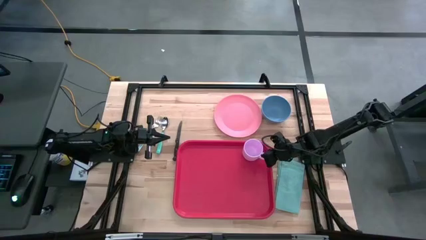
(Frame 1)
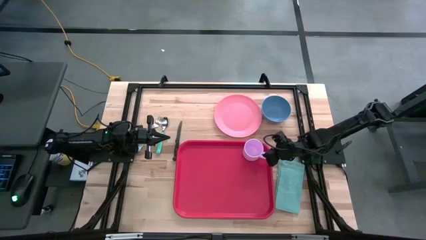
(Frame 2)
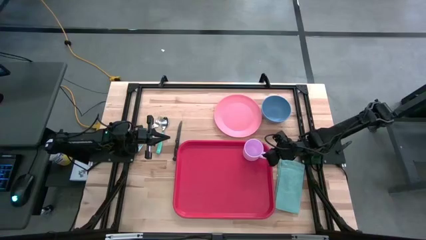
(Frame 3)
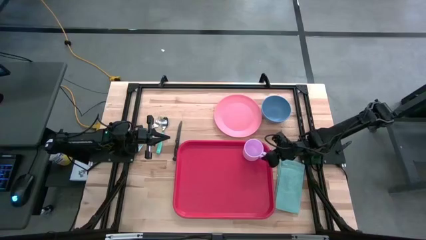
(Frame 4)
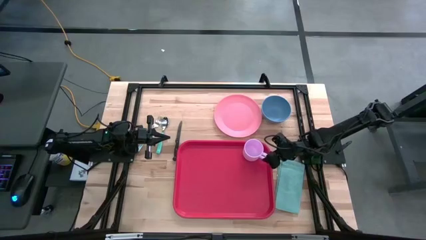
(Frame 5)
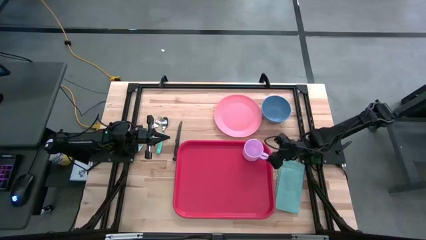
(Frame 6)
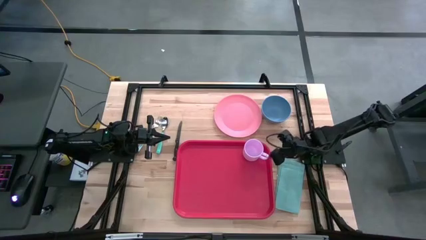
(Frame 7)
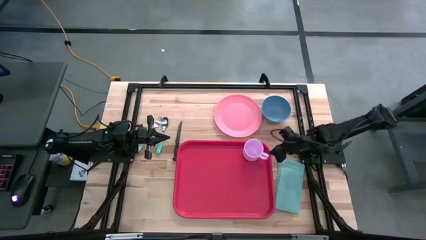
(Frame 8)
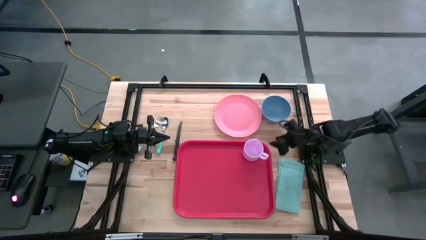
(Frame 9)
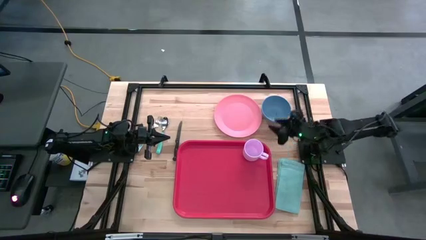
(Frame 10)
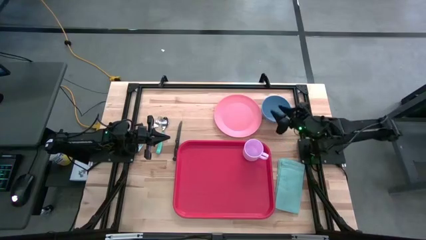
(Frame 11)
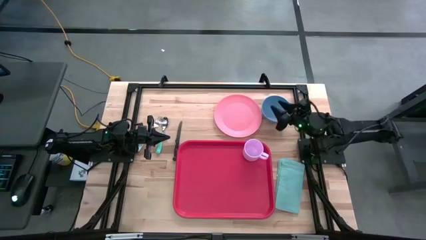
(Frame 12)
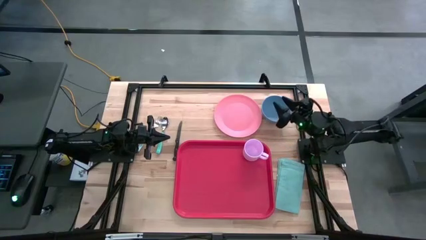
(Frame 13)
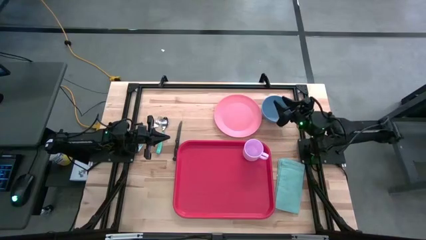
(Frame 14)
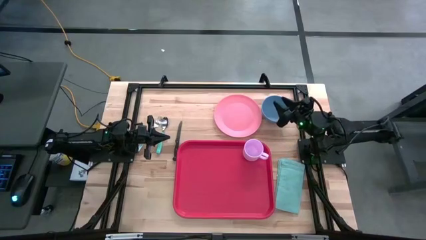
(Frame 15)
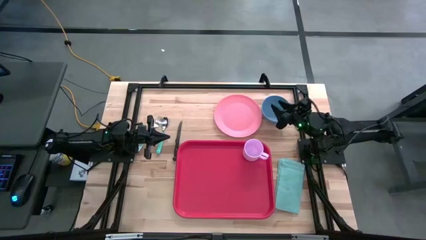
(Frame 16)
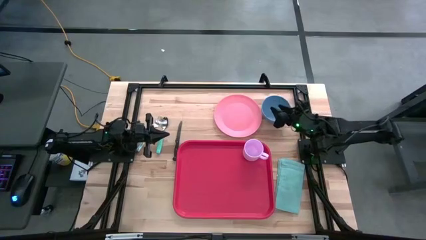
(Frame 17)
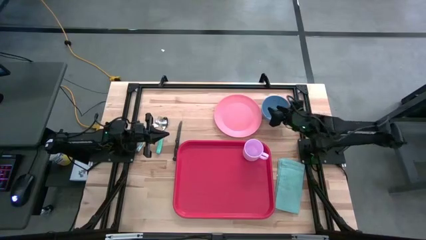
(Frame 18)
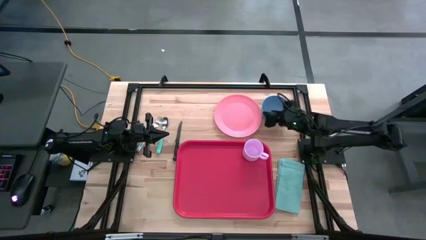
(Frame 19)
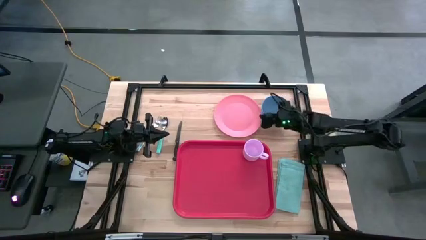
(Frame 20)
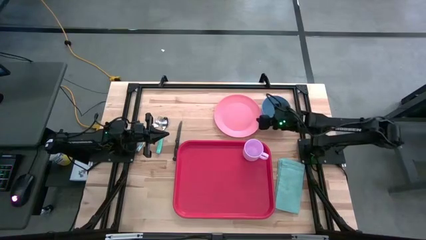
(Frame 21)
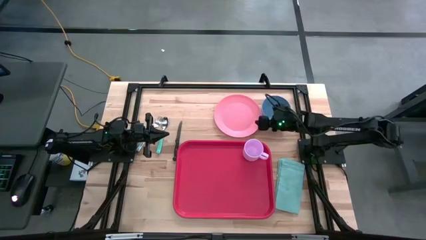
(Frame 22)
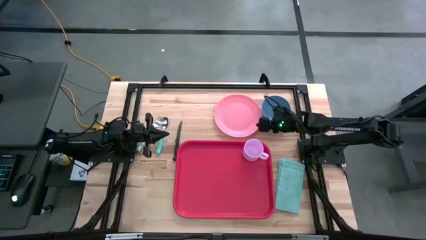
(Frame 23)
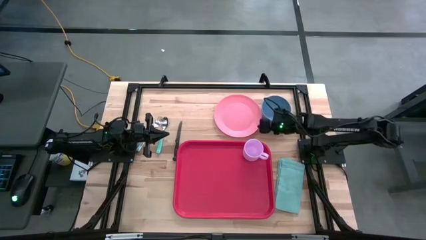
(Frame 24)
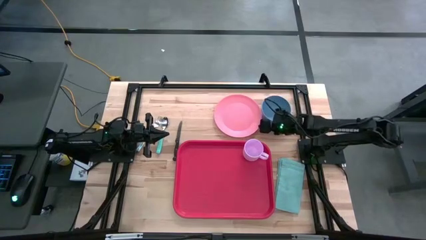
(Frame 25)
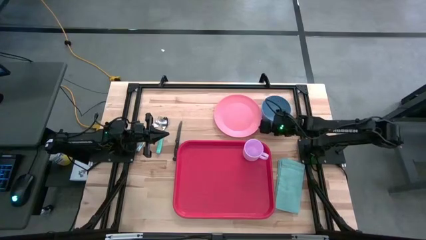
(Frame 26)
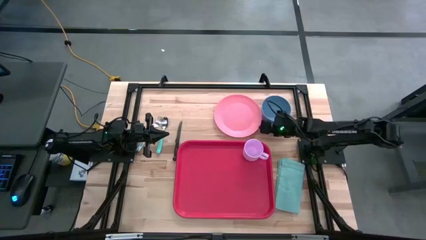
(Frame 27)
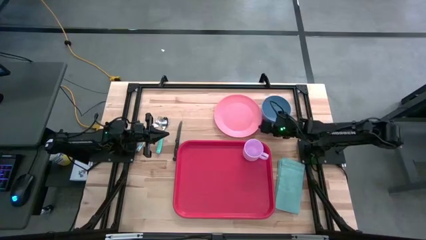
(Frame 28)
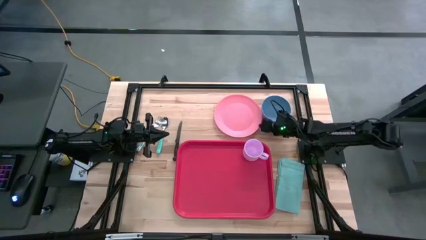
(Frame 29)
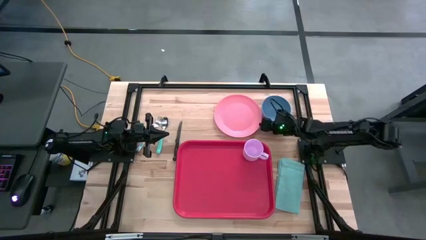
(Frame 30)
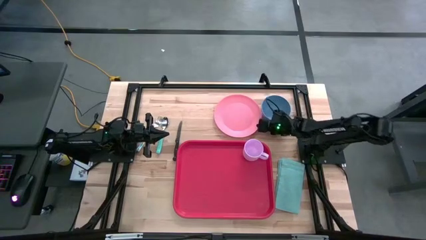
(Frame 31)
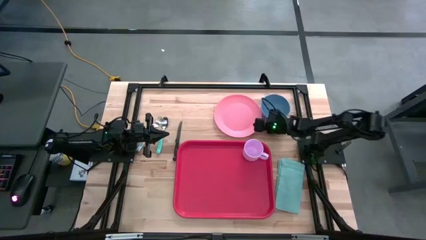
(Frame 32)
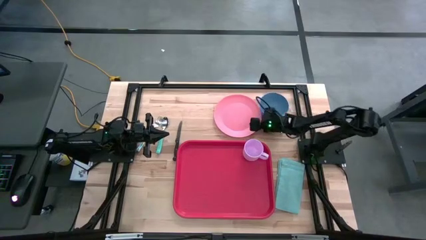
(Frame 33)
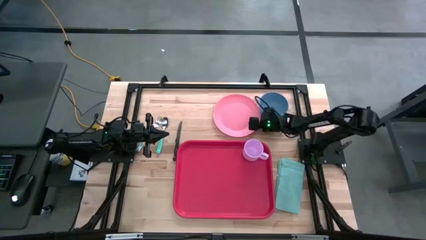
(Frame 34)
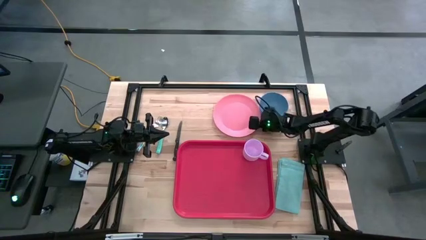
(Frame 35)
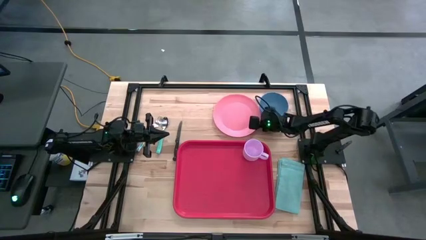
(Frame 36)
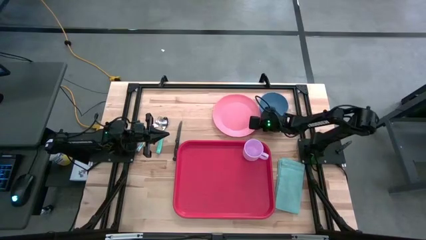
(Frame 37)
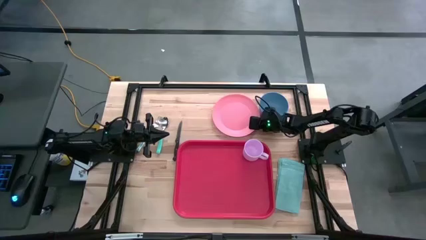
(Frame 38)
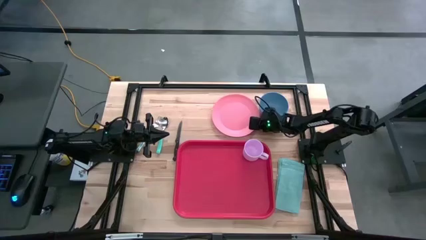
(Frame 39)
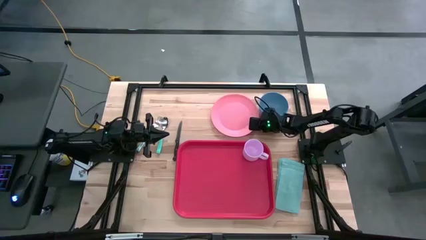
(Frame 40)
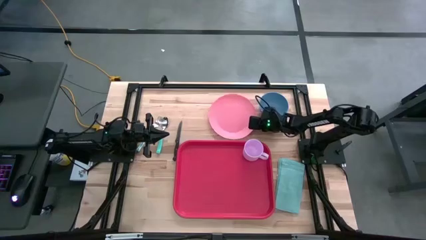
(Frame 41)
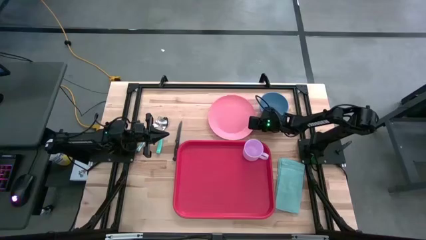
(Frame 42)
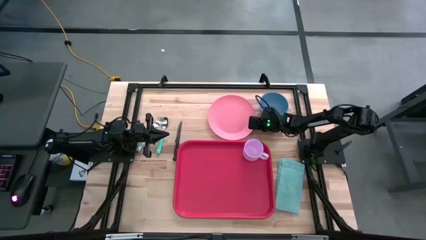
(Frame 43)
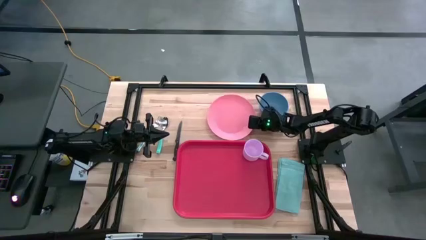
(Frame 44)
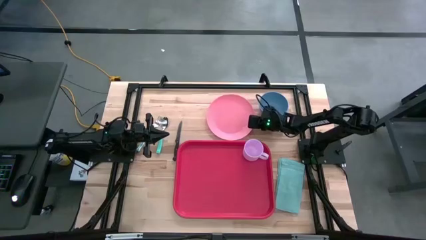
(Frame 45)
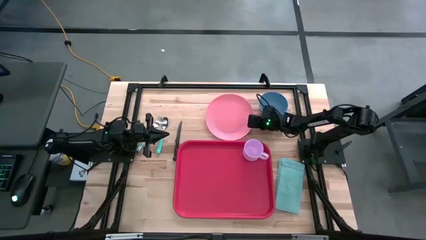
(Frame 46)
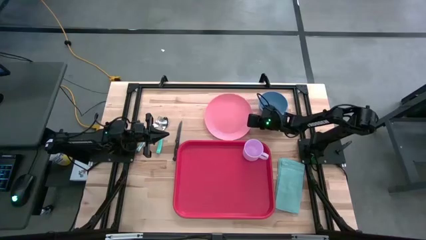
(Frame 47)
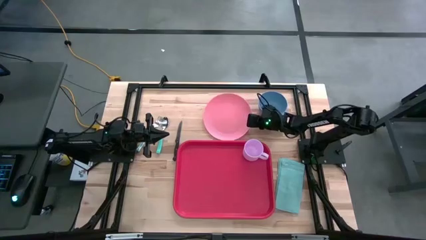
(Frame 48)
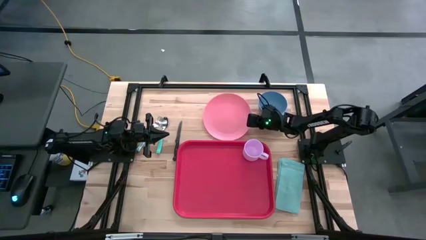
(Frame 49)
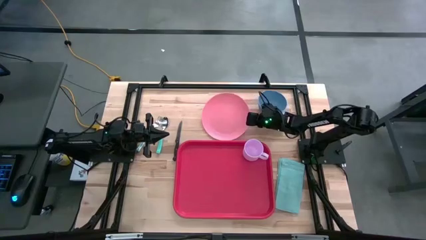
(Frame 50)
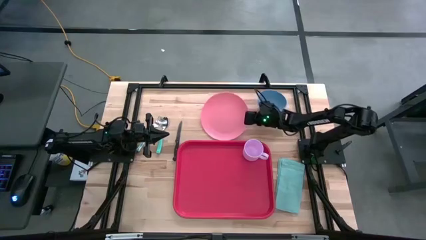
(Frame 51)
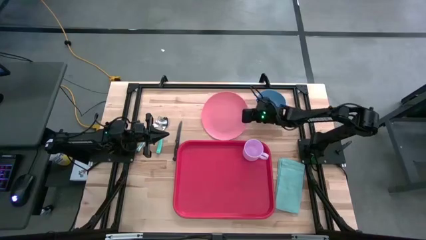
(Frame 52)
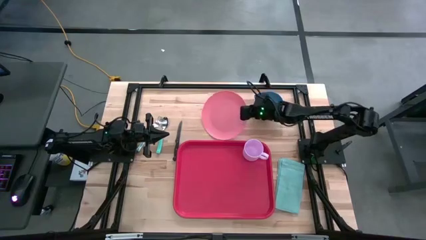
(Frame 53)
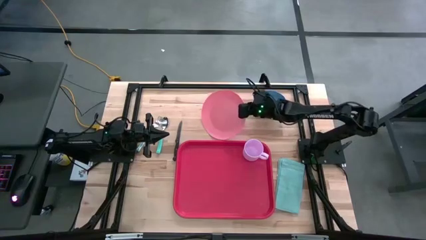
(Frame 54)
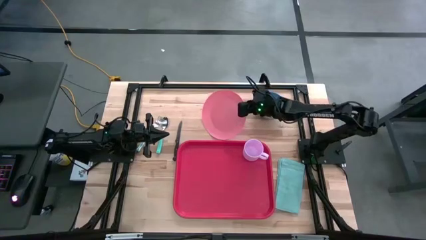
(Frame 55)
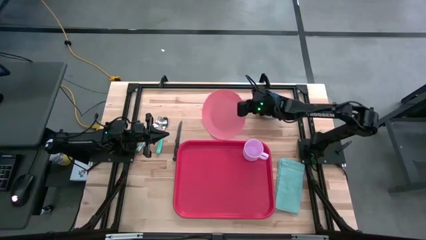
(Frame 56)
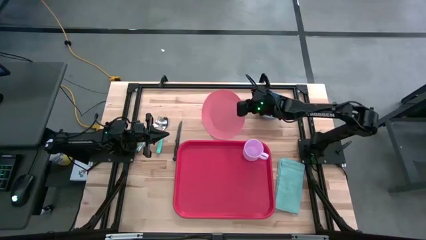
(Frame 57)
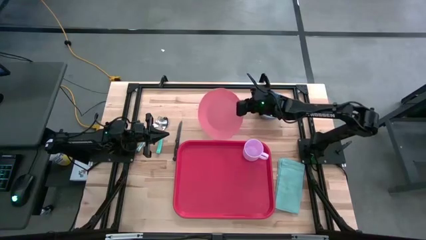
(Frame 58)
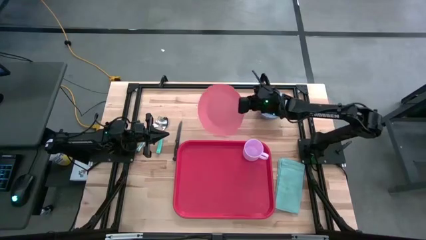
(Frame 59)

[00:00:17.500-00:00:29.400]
Task: Set up tray
Put the pink plate into the pink serving tray
